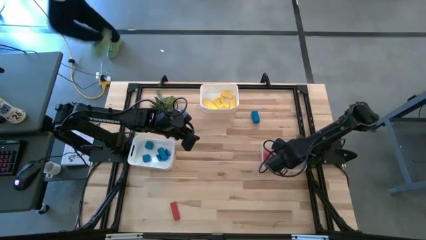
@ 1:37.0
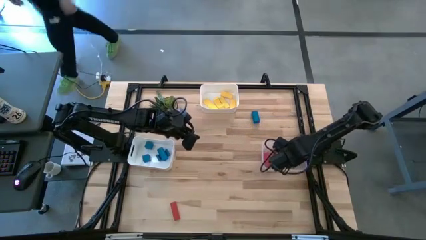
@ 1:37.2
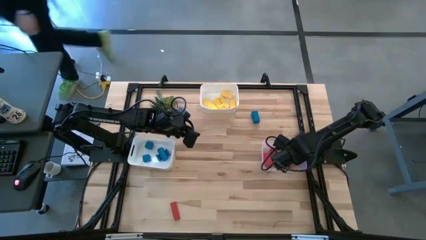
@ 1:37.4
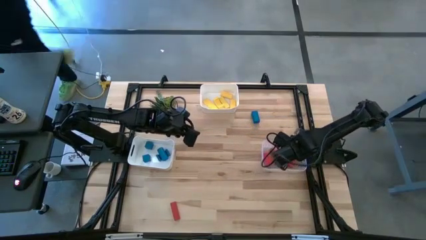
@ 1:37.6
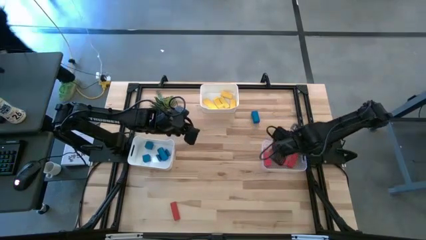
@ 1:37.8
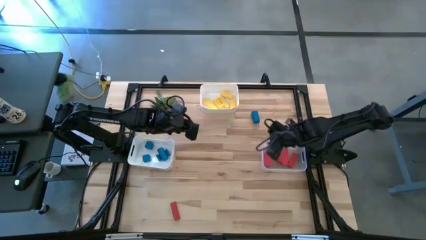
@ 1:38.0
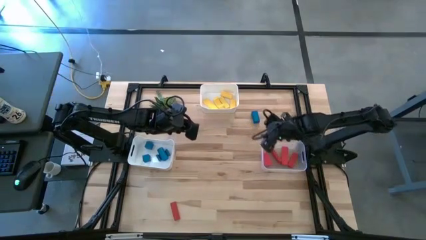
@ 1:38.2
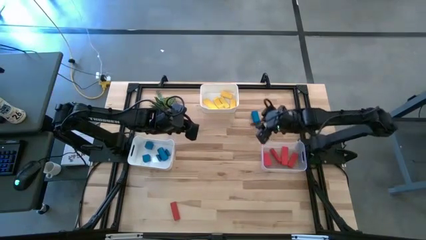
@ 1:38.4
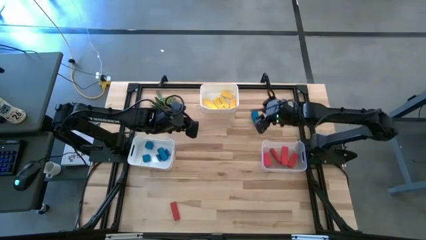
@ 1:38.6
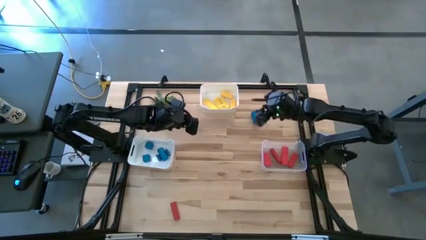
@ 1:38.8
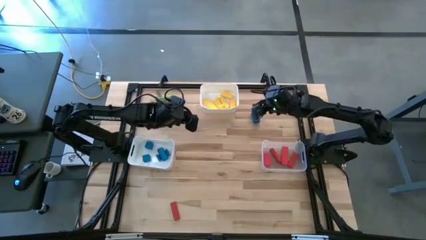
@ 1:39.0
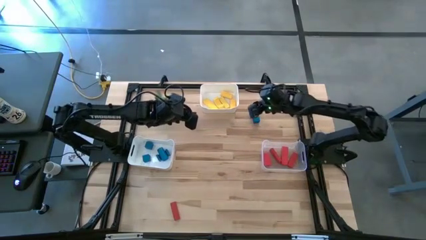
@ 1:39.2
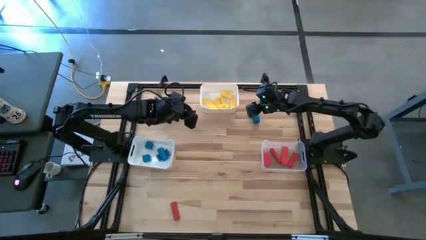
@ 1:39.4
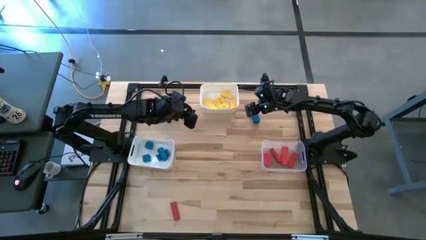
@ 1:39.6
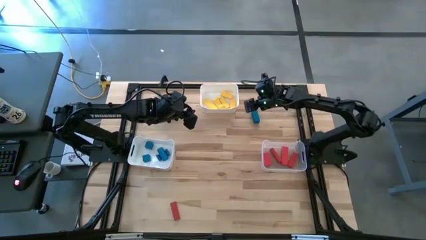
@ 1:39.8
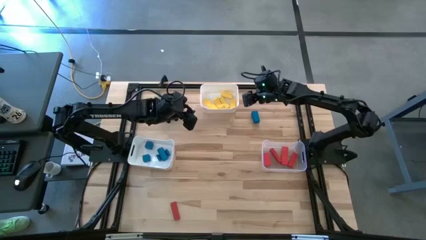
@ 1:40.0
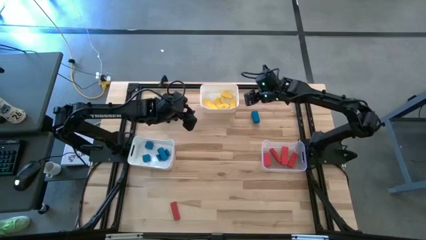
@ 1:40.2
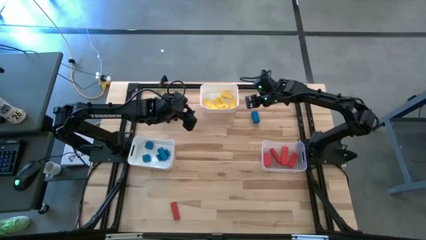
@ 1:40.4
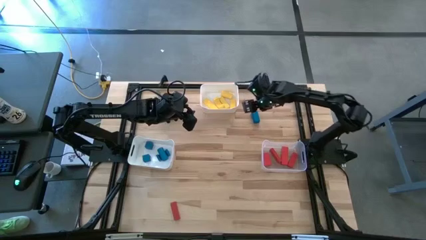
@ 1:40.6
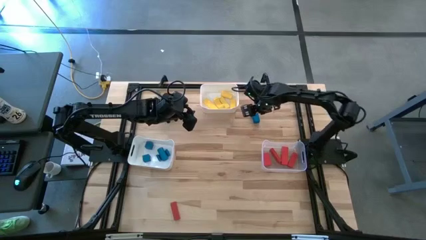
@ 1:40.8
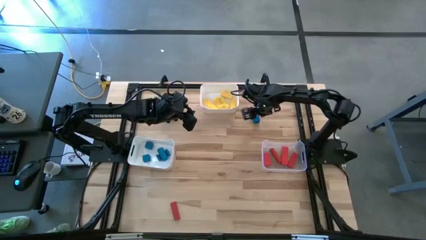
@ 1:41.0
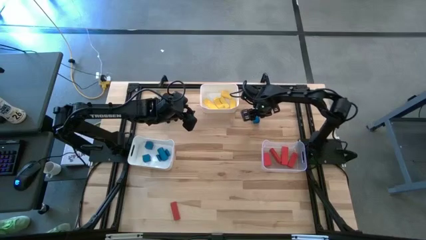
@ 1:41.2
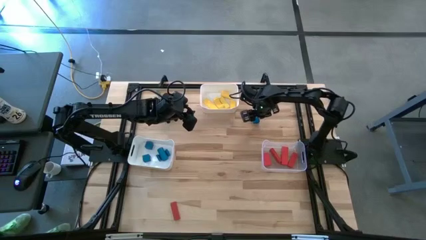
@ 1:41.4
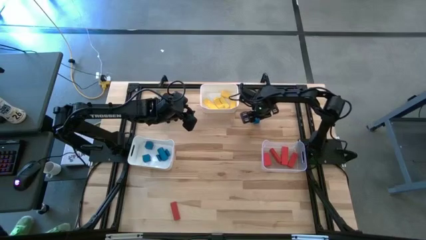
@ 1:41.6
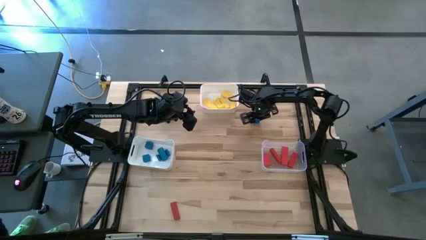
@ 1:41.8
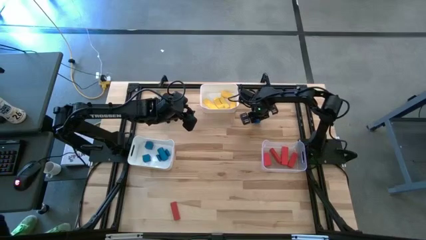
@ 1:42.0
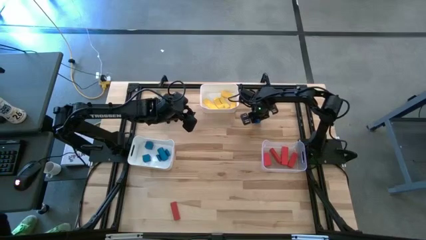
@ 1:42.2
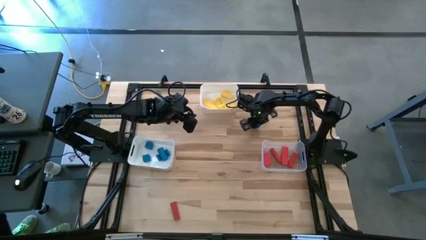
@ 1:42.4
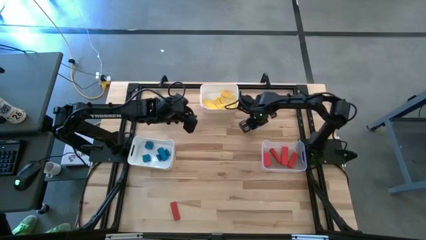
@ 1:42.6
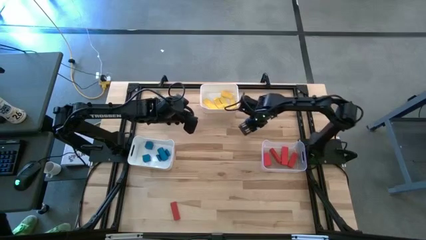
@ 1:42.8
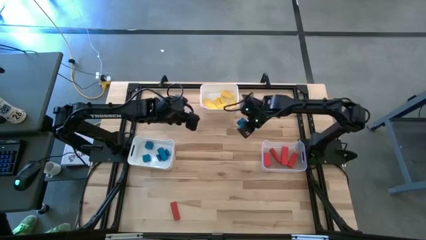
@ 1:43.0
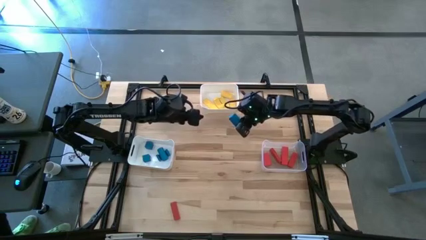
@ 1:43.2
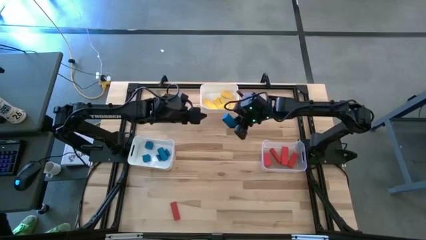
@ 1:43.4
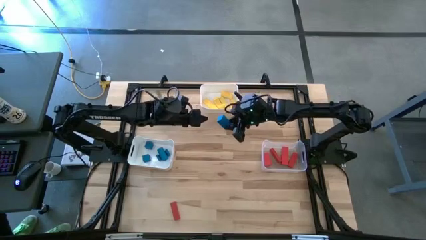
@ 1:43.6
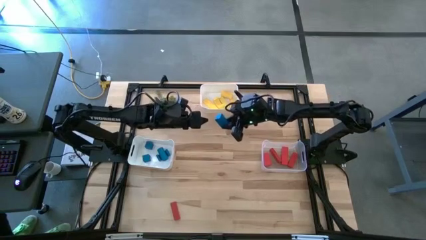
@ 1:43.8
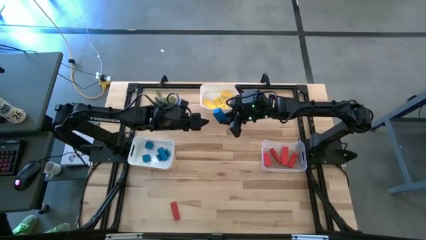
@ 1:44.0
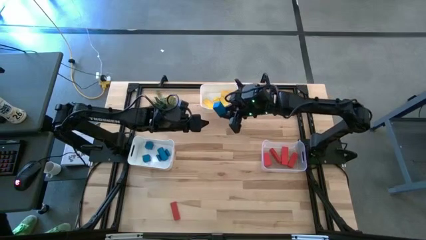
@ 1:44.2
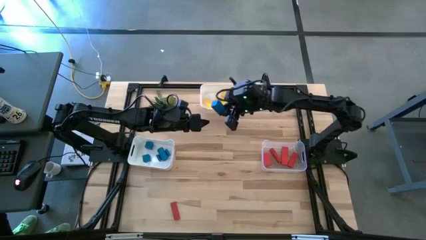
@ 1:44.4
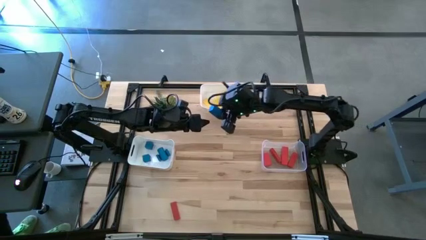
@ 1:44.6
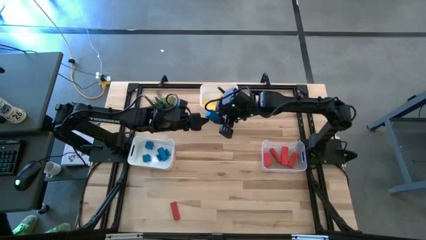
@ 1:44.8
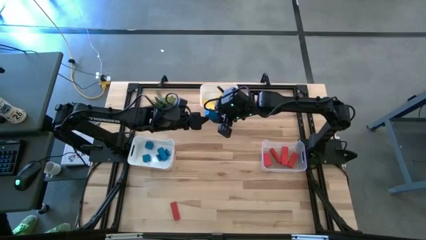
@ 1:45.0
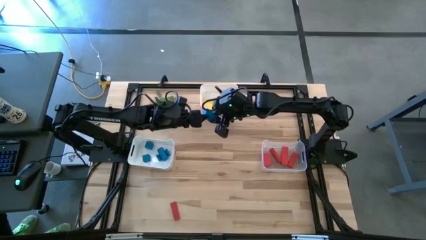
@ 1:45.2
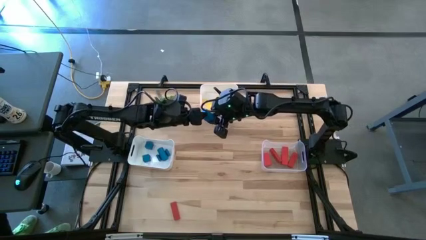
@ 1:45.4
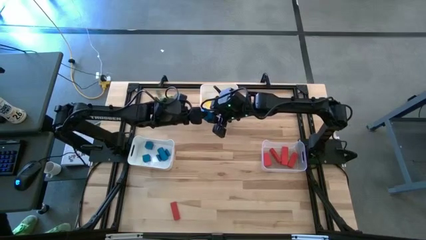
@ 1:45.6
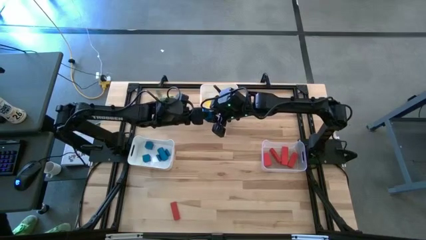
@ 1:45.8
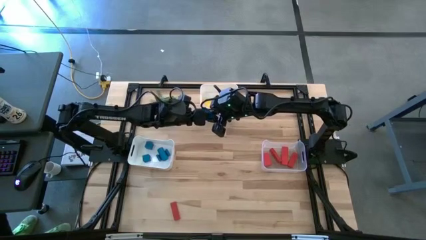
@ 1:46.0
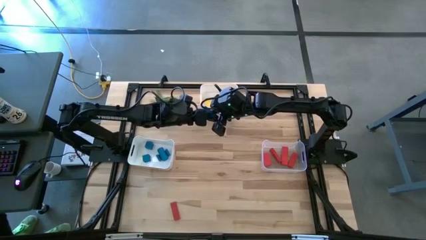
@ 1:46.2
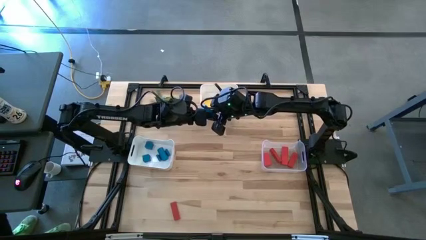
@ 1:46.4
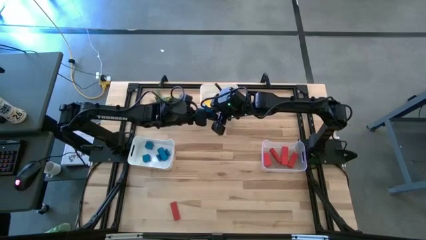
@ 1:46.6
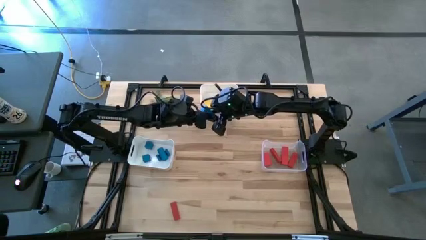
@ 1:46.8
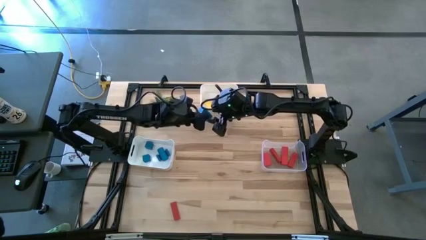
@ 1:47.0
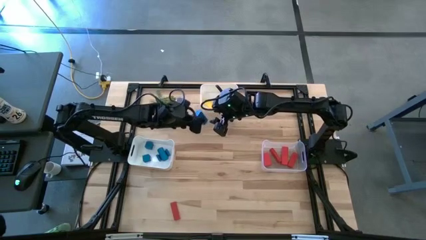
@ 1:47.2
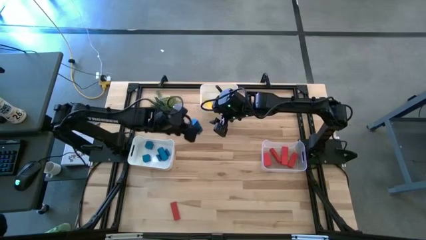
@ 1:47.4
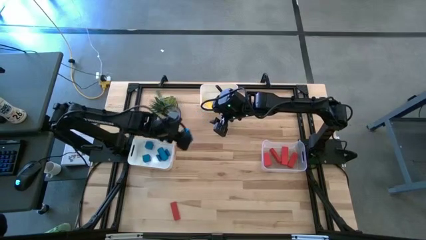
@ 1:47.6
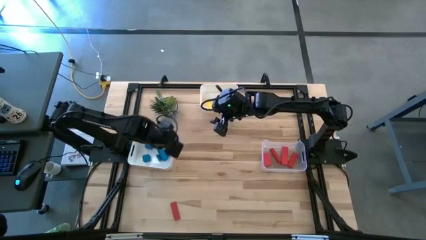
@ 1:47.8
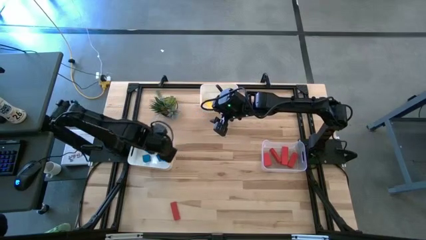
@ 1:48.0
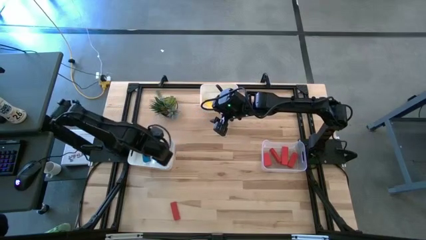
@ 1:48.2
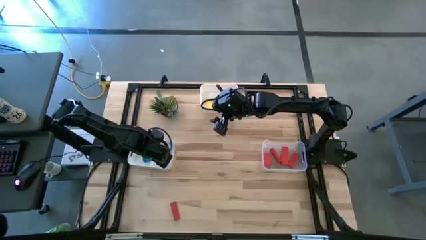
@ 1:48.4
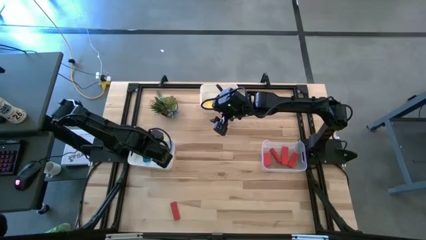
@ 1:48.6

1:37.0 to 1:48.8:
Task: Sort & place blocks by color
Put the blue block into the bottom left white bin

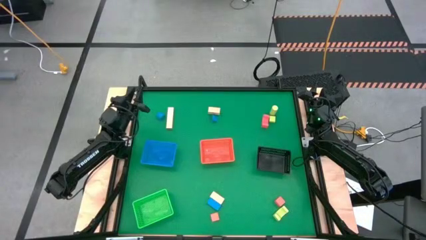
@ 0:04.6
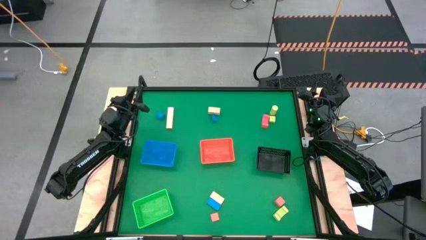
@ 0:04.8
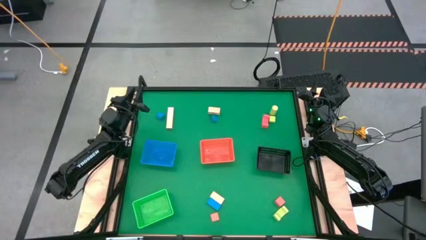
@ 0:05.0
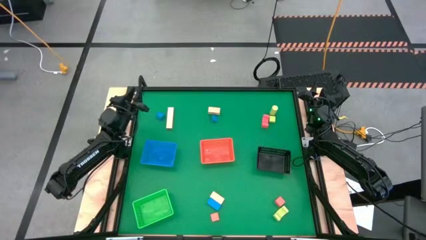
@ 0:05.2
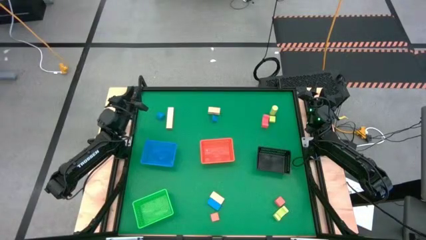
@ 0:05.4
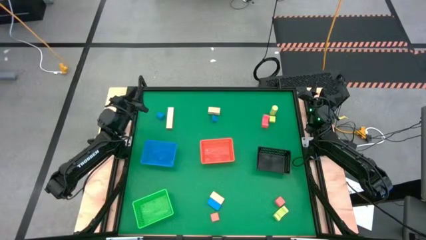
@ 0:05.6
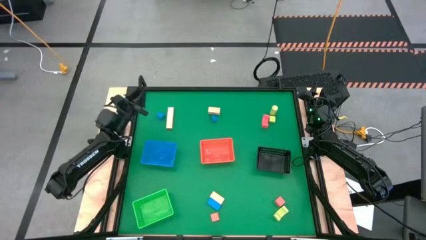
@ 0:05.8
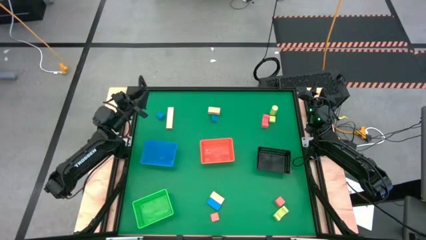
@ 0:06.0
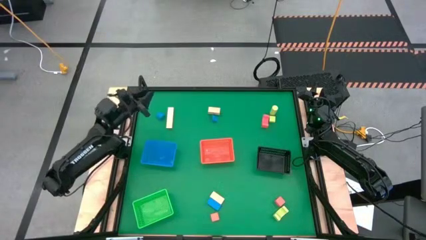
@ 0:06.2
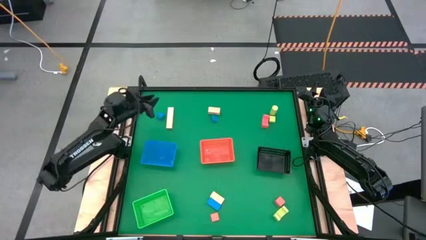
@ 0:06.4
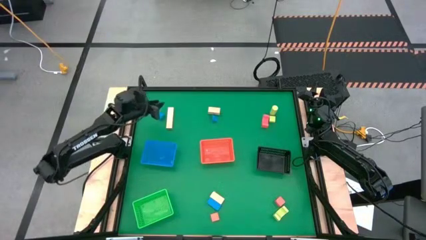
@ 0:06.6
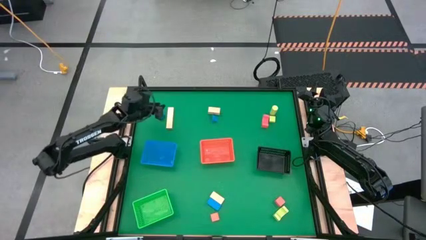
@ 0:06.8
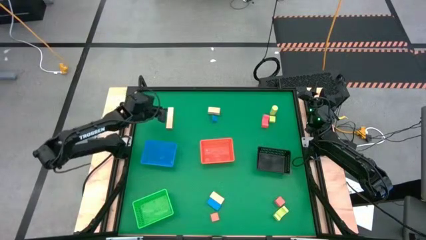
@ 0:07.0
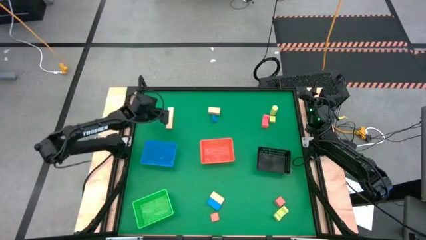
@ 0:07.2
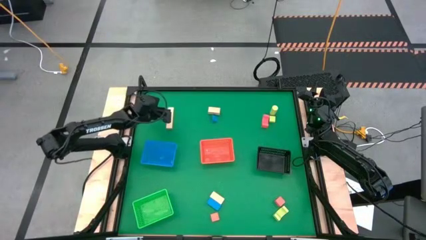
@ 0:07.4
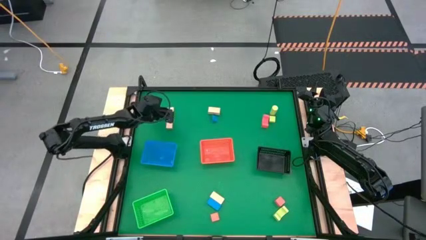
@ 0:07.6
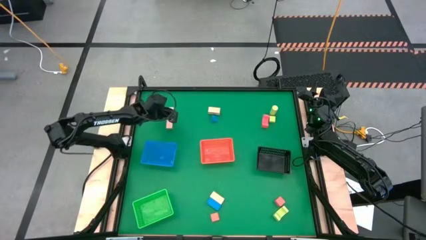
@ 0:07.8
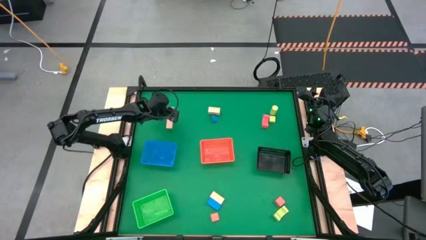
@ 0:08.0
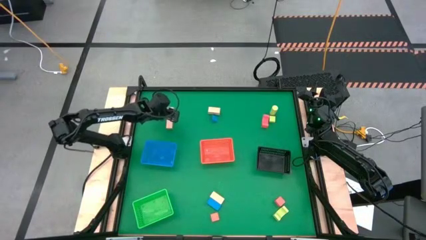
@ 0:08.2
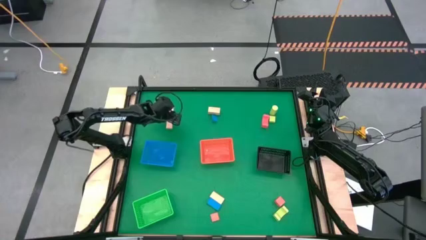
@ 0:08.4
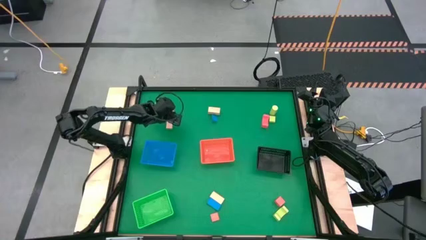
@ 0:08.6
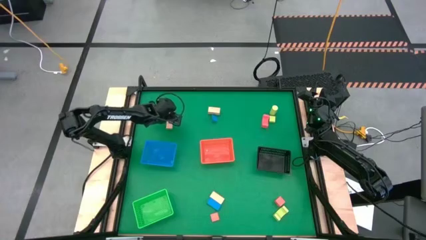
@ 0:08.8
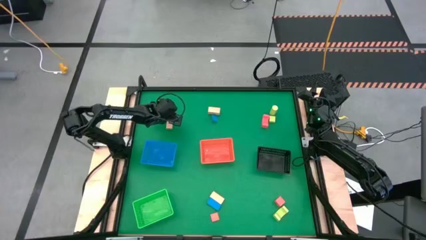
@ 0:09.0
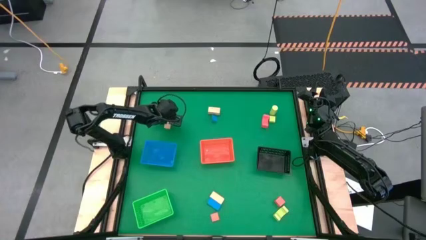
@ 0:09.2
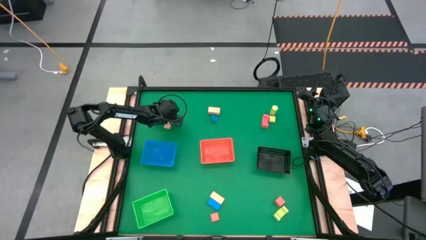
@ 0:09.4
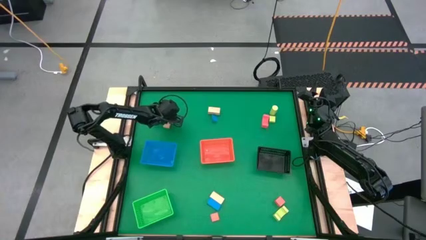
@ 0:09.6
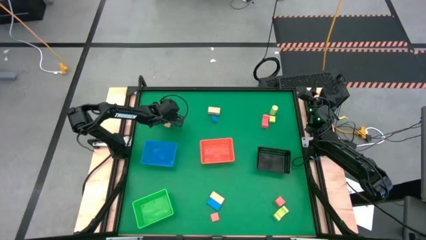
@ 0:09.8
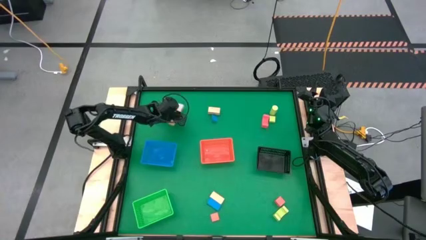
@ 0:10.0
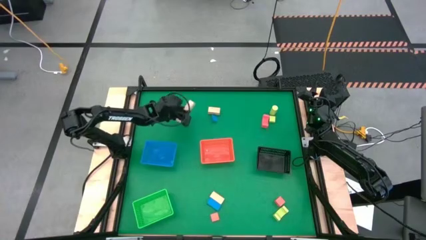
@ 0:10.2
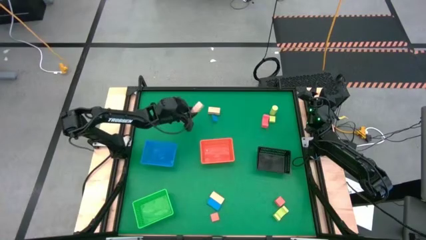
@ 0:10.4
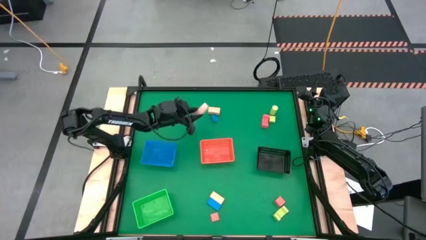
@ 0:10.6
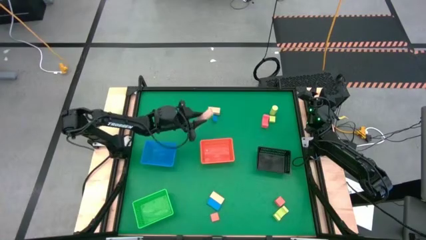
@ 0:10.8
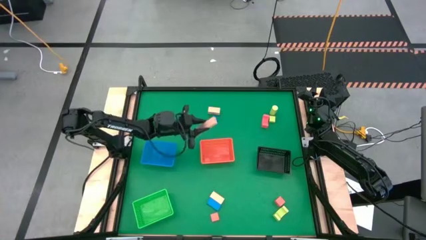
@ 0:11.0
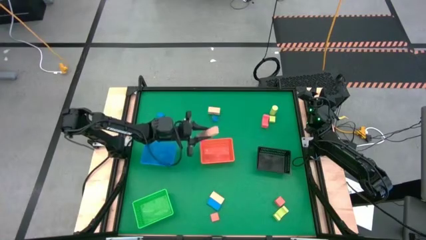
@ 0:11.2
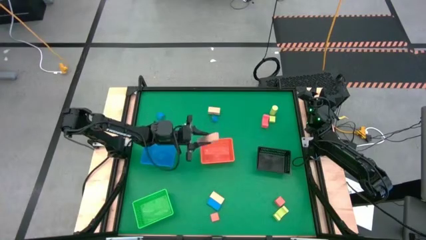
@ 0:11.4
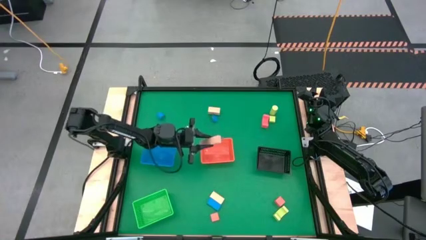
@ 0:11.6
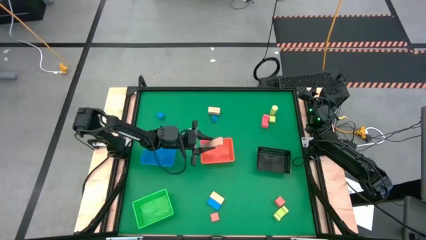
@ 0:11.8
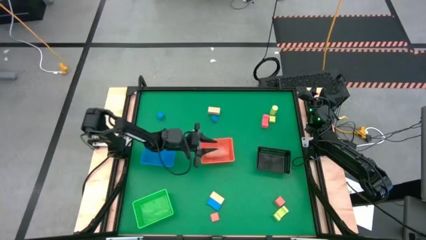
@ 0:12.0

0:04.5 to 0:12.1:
Task: Sort & place blocks by color
Put the top left brown block into the orange bin
